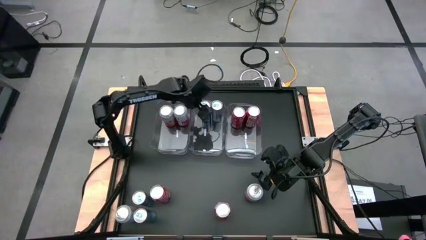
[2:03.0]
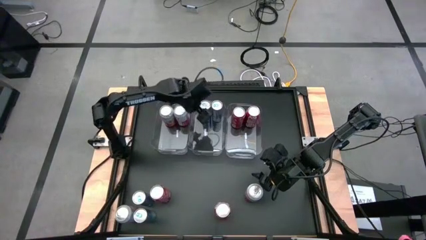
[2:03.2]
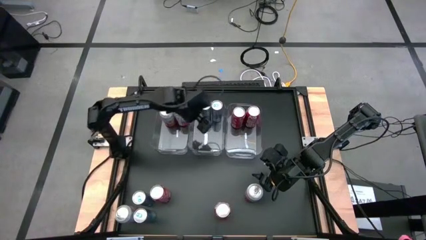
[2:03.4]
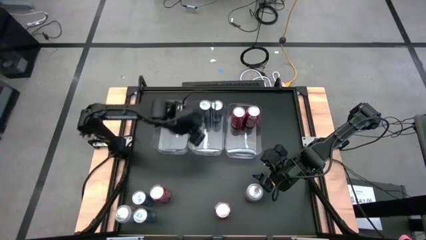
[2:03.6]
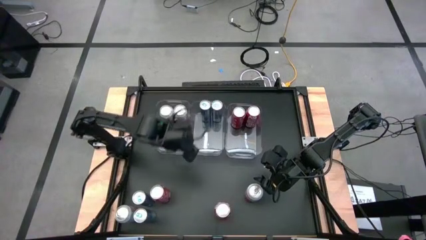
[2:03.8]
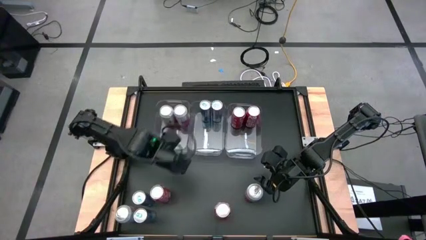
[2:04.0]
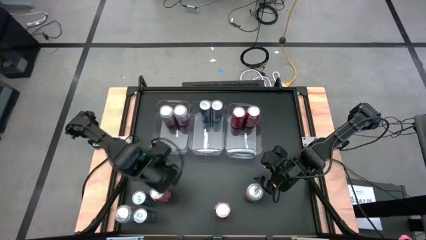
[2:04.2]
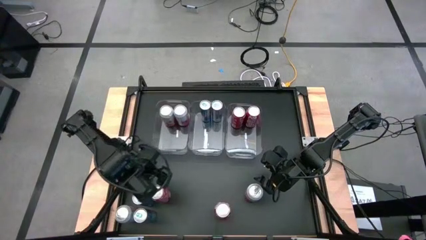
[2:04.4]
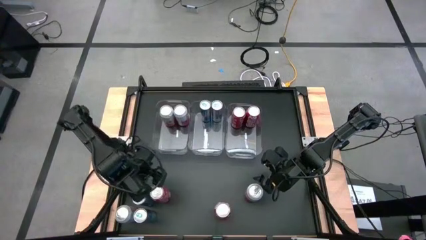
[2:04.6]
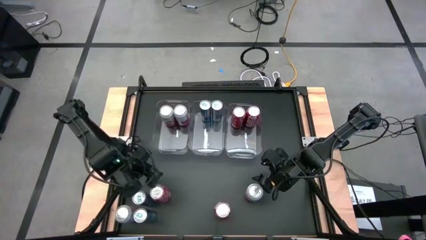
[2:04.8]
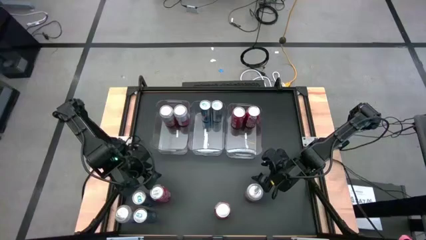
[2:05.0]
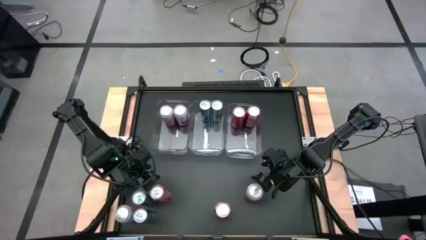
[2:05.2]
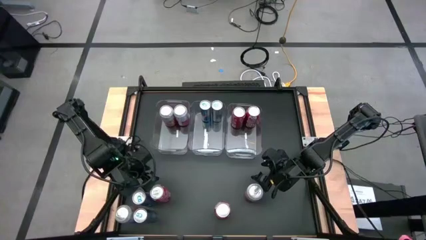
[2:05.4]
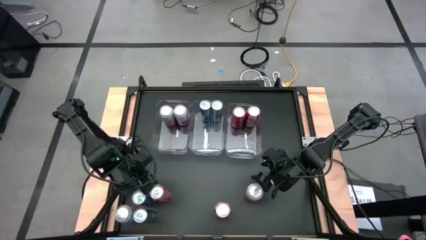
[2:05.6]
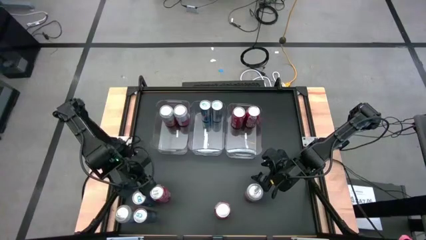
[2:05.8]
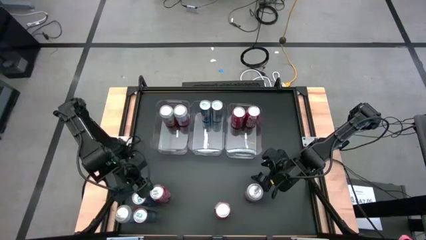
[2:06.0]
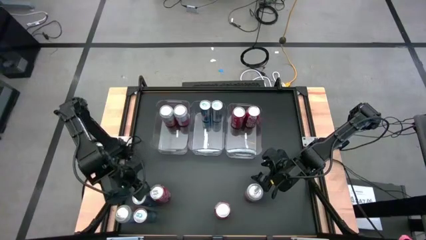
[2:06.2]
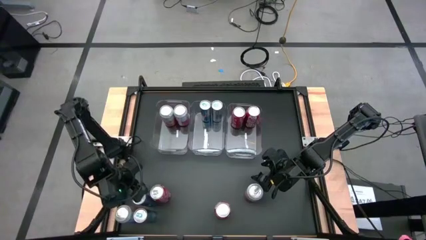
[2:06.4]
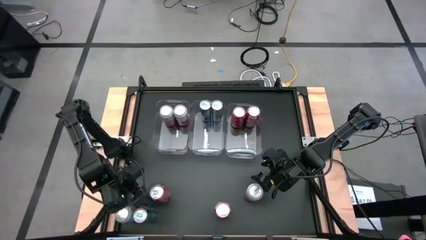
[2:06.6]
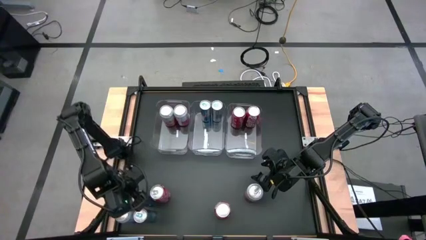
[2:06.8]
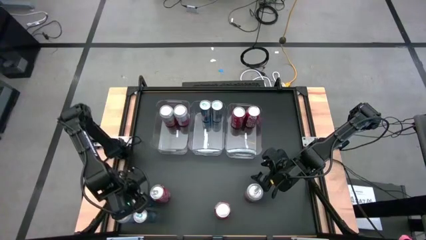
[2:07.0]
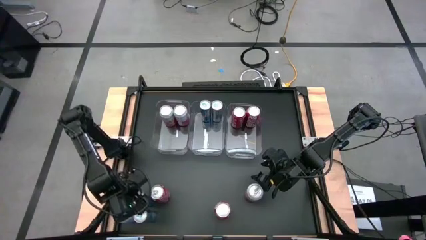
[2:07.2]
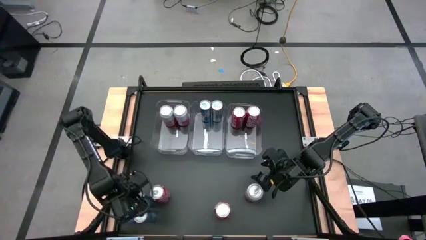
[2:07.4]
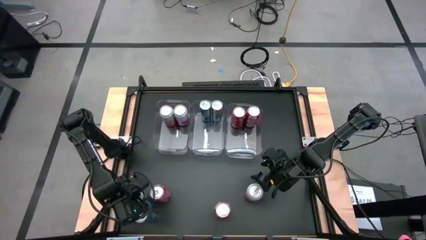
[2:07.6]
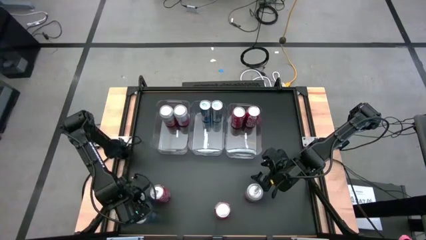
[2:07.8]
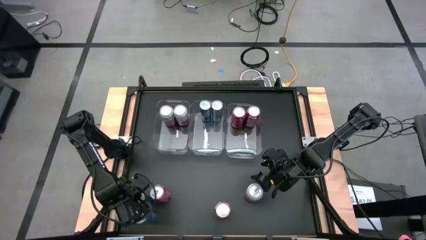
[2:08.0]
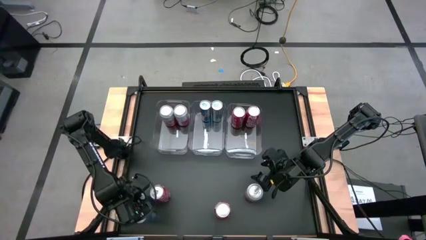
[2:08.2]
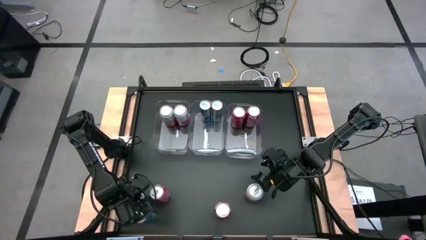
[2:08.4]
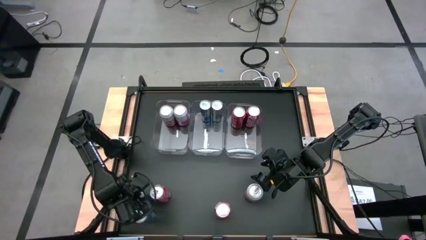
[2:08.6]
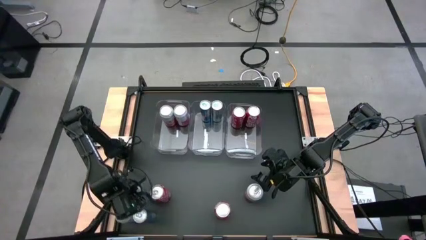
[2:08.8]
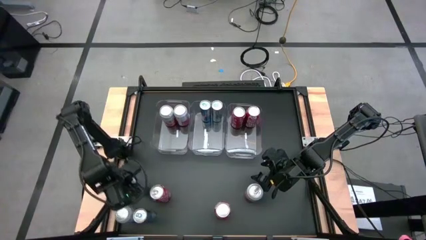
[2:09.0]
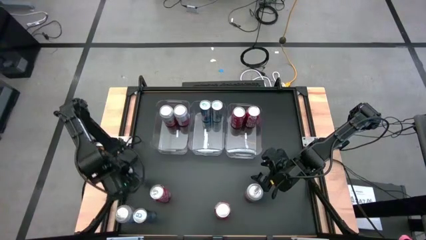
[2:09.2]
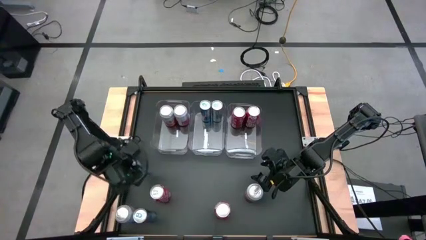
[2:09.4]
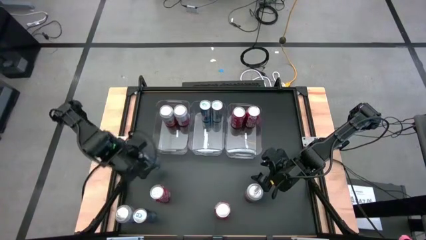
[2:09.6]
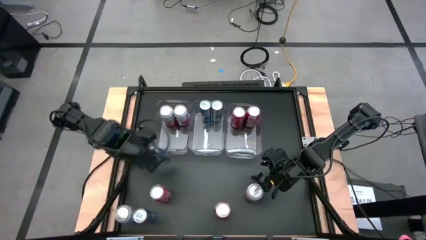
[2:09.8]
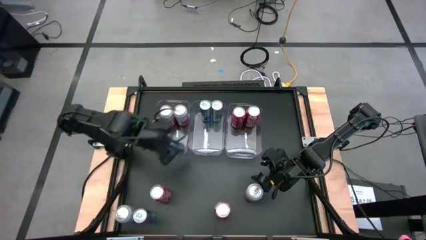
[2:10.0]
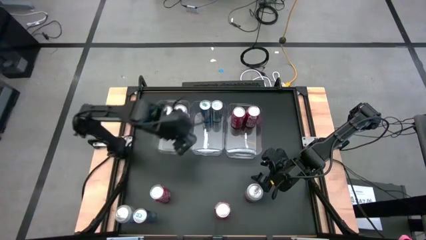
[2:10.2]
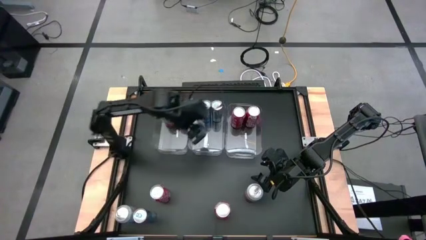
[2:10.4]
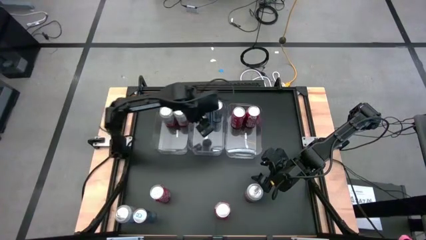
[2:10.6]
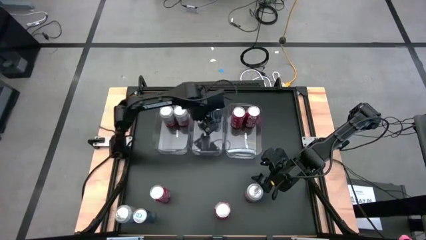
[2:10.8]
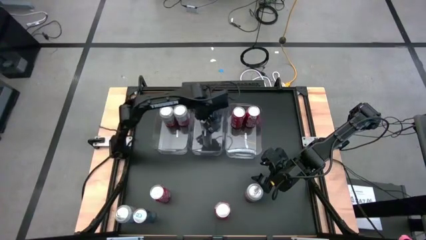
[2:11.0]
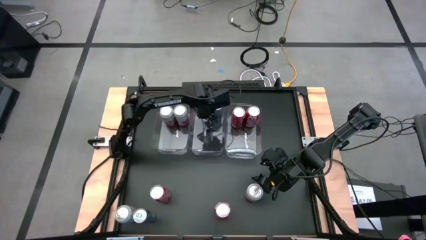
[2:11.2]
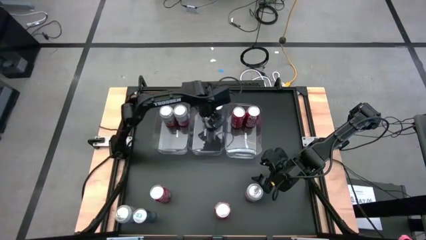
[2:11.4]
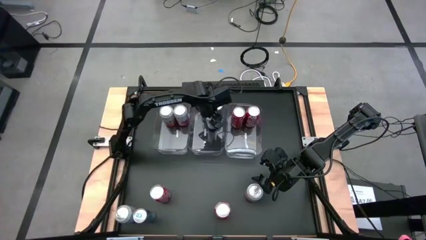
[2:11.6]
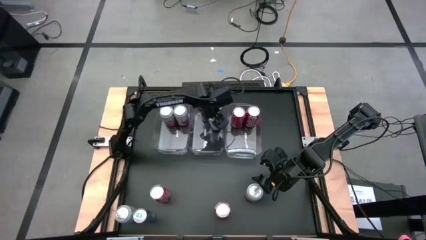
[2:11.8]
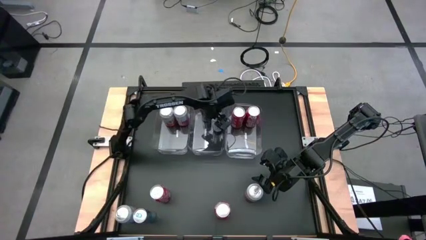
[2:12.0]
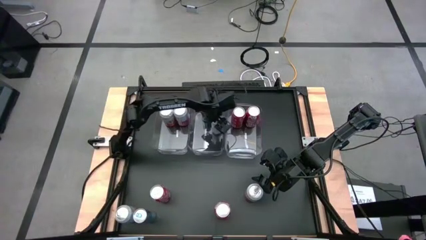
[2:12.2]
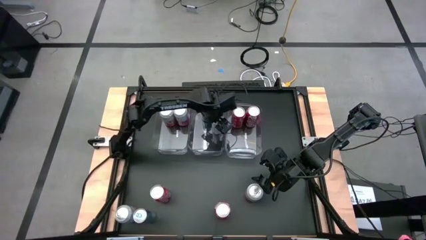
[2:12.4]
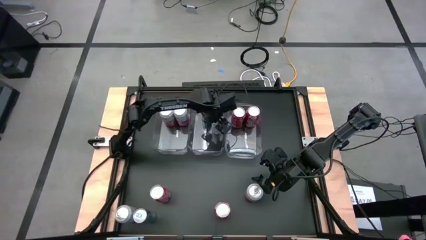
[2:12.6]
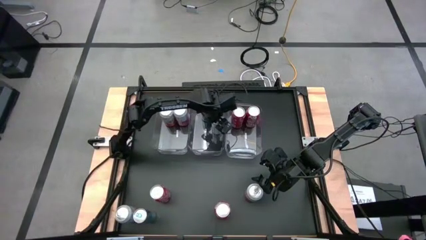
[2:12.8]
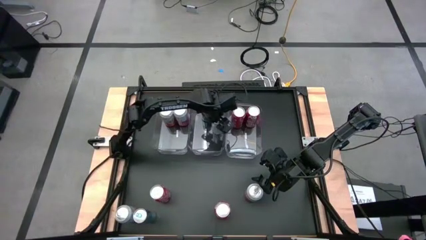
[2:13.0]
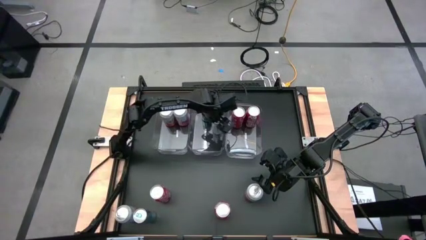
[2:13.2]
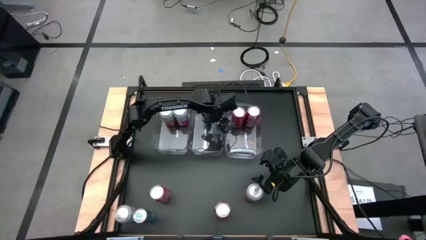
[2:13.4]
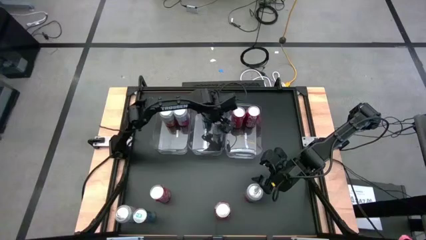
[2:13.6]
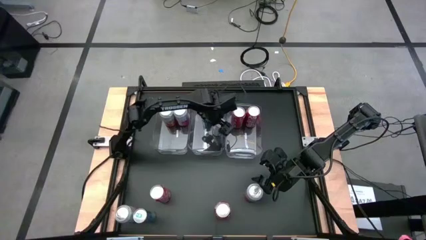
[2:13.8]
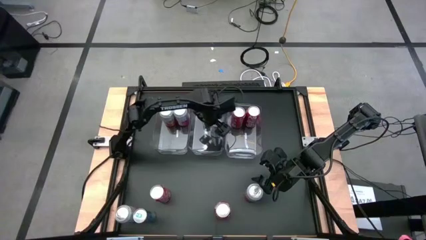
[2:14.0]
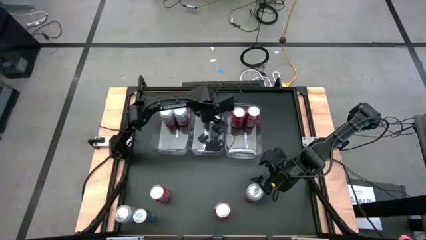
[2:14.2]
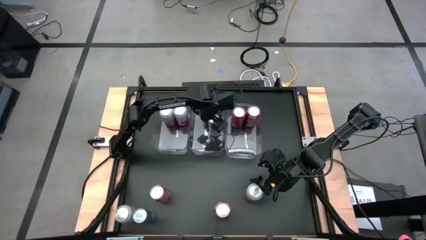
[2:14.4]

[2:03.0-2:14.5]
Task: Sort soda cans
Put the top blue soda can into the center transparent bin
